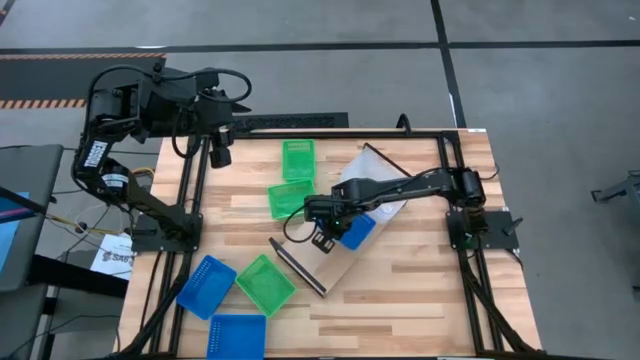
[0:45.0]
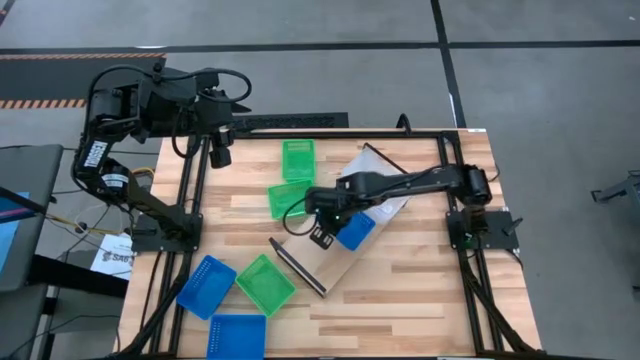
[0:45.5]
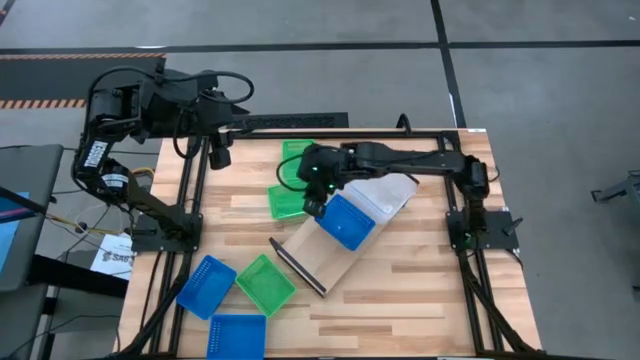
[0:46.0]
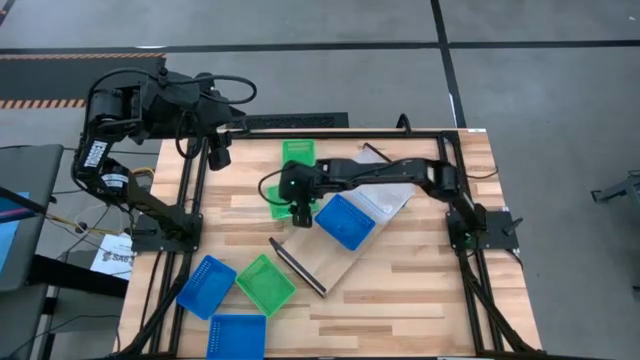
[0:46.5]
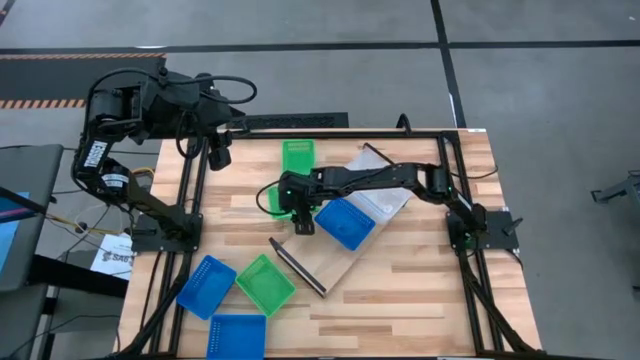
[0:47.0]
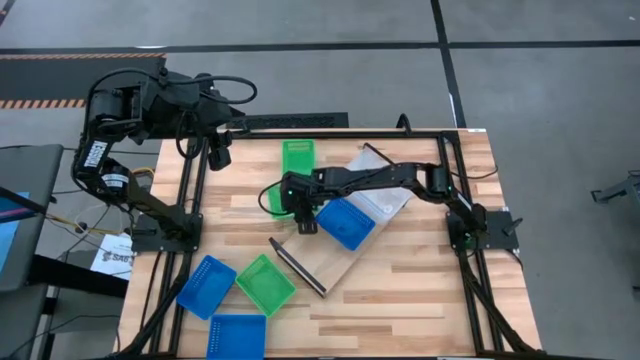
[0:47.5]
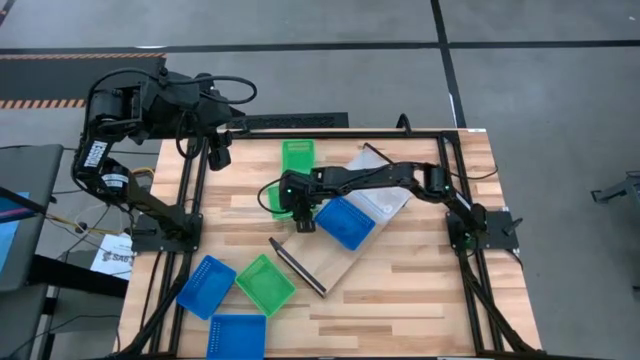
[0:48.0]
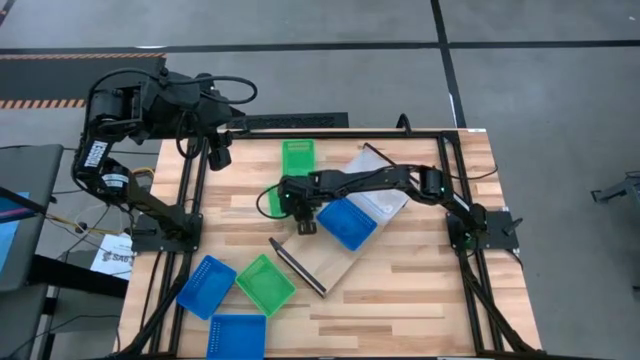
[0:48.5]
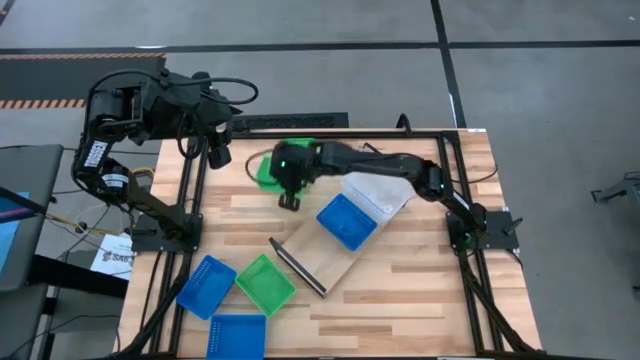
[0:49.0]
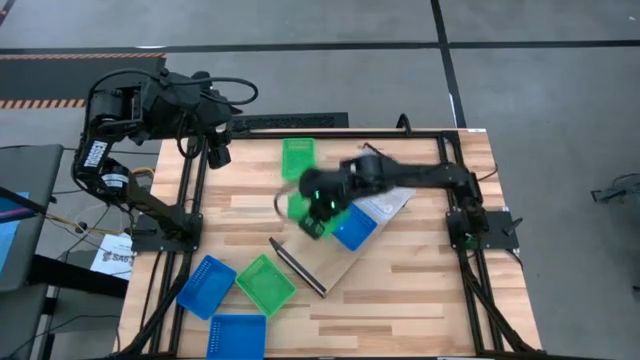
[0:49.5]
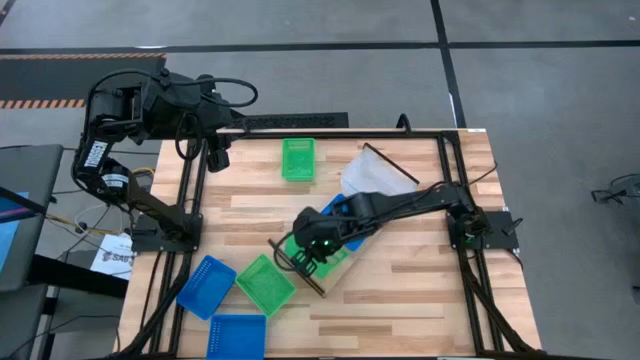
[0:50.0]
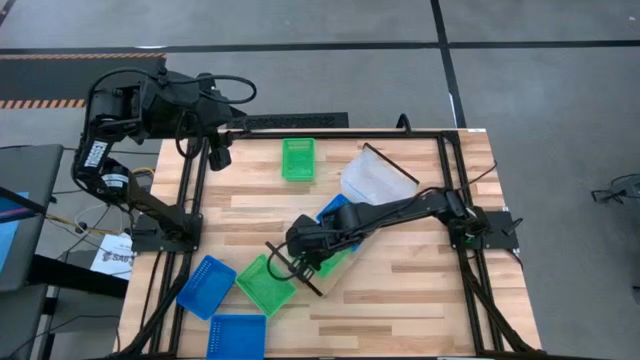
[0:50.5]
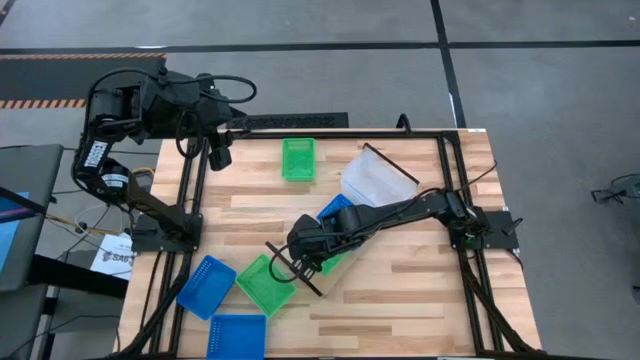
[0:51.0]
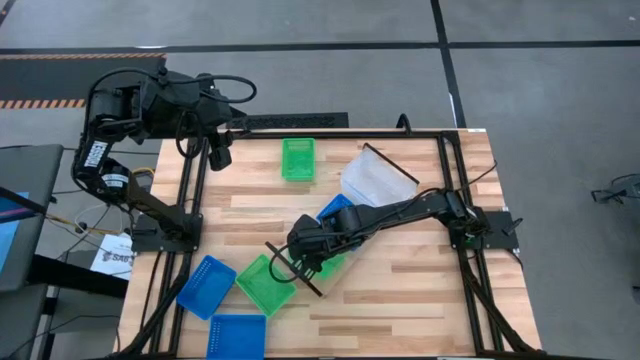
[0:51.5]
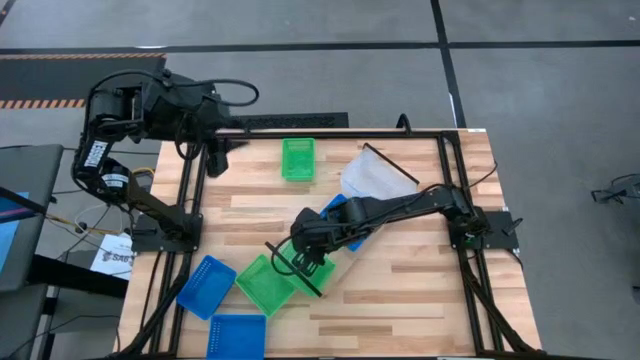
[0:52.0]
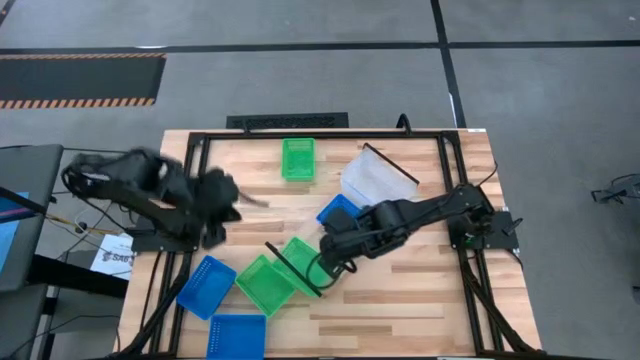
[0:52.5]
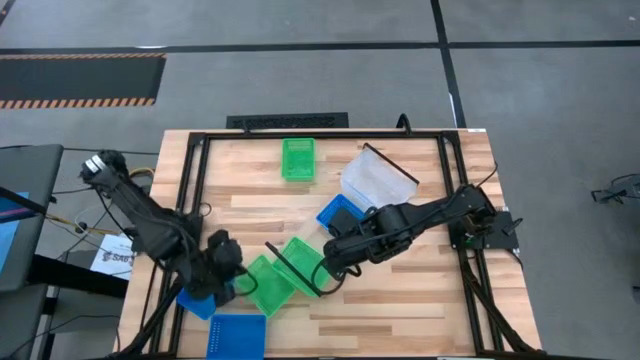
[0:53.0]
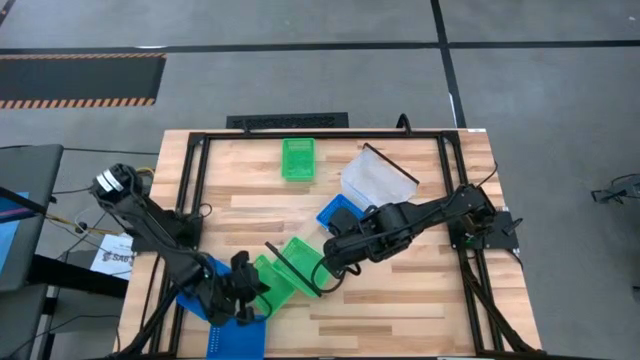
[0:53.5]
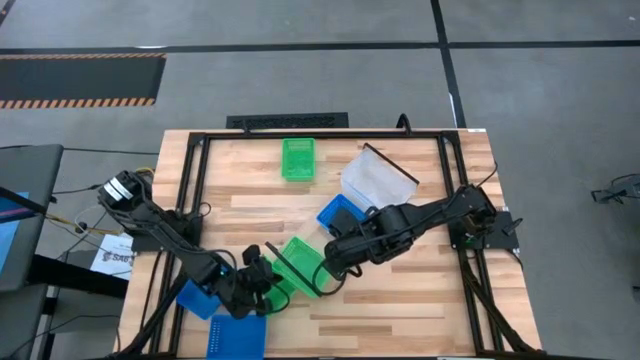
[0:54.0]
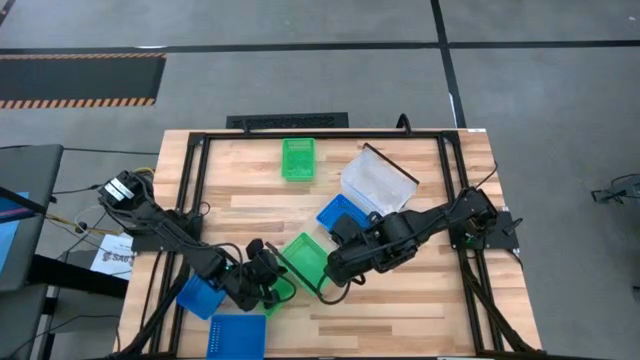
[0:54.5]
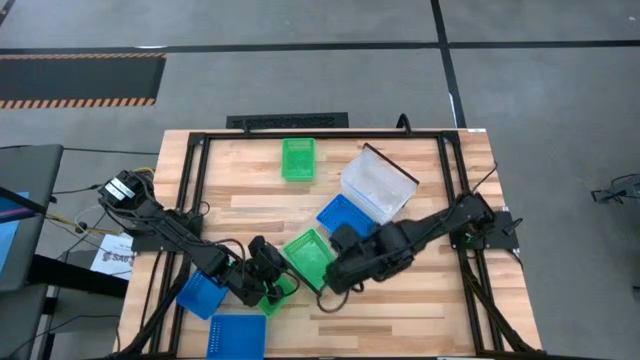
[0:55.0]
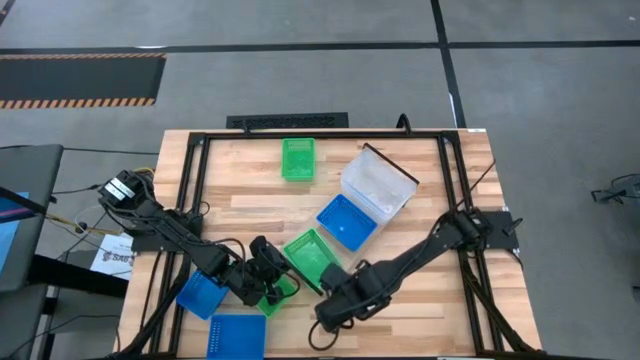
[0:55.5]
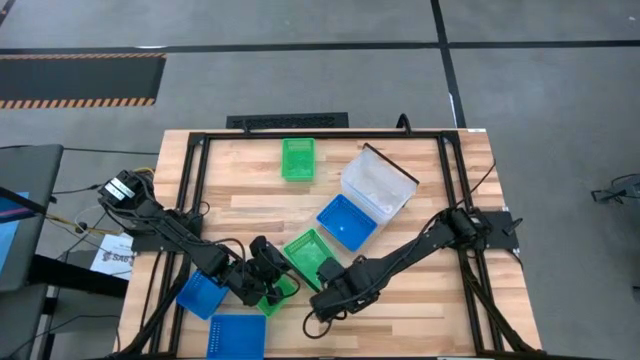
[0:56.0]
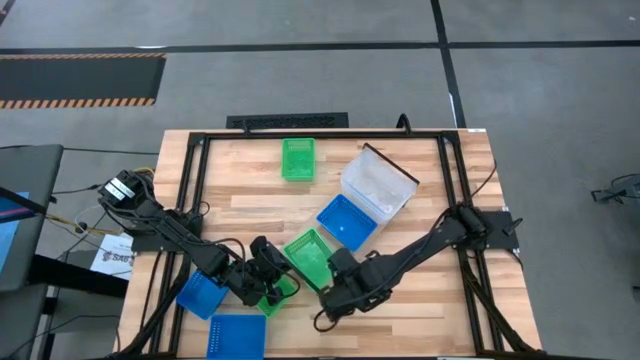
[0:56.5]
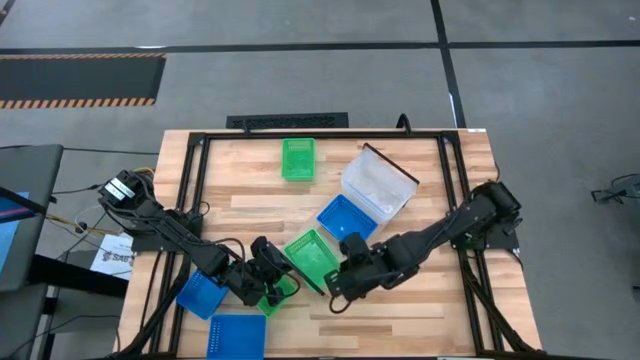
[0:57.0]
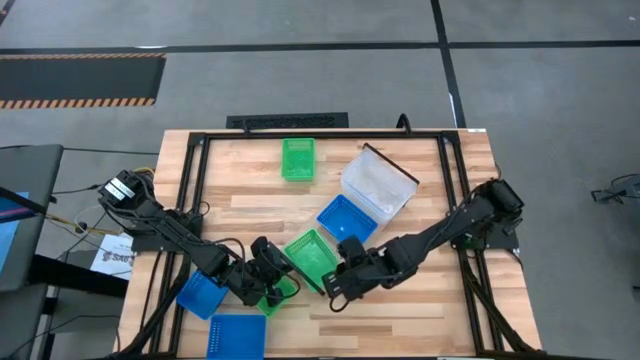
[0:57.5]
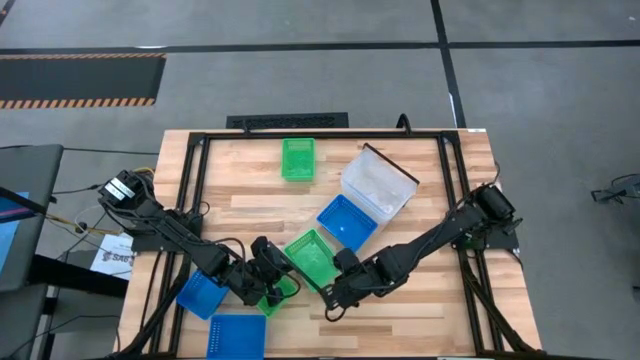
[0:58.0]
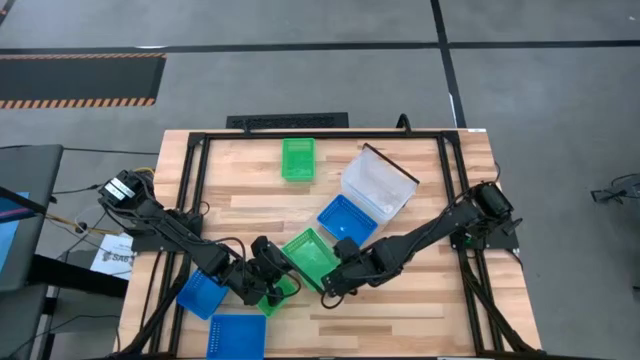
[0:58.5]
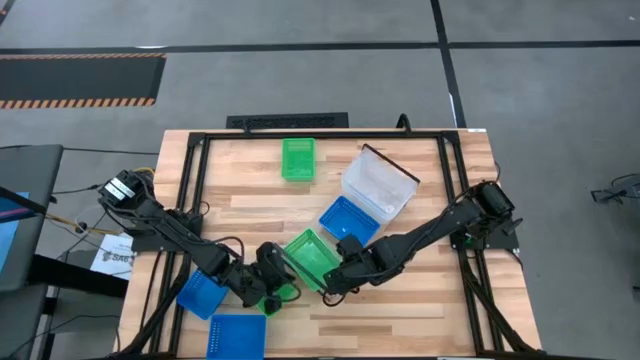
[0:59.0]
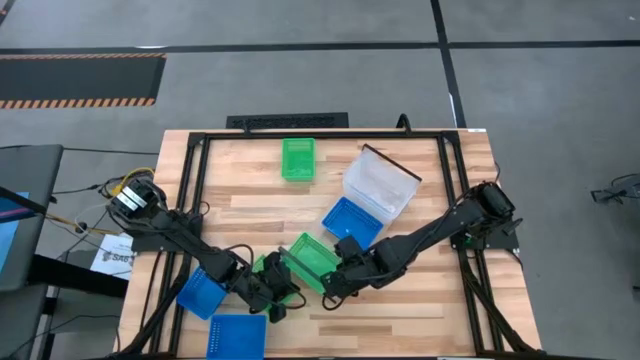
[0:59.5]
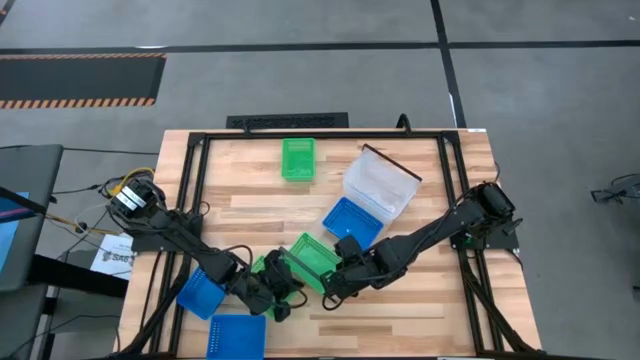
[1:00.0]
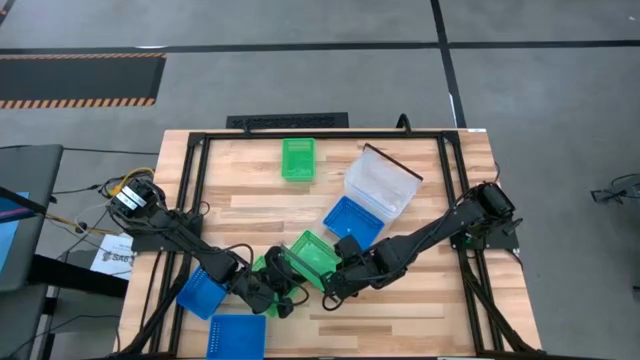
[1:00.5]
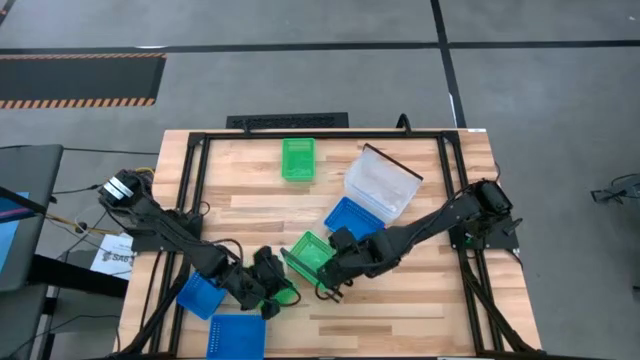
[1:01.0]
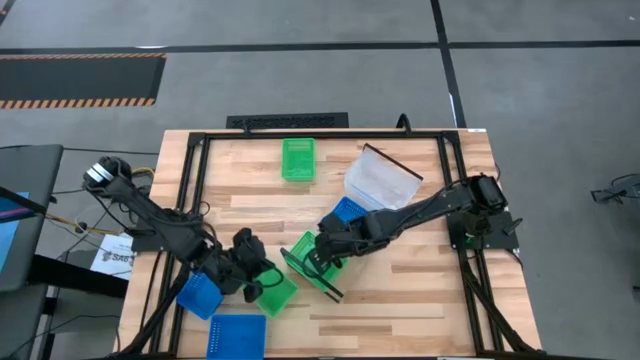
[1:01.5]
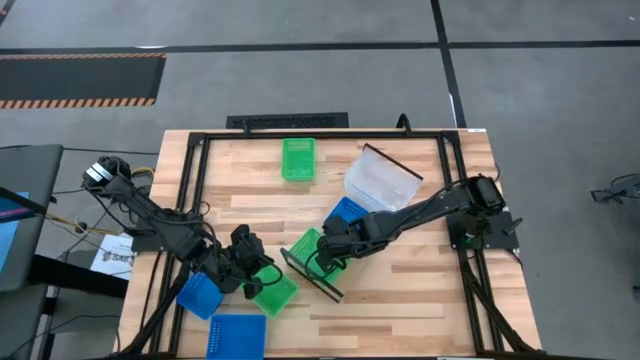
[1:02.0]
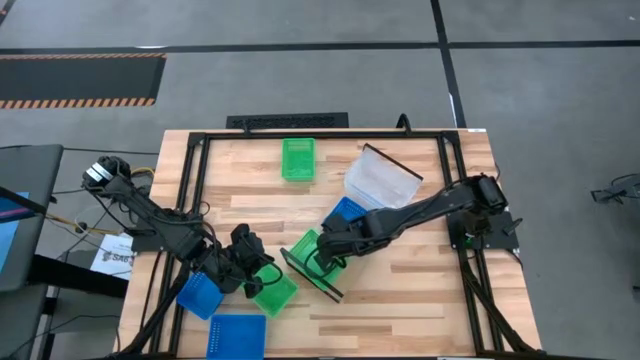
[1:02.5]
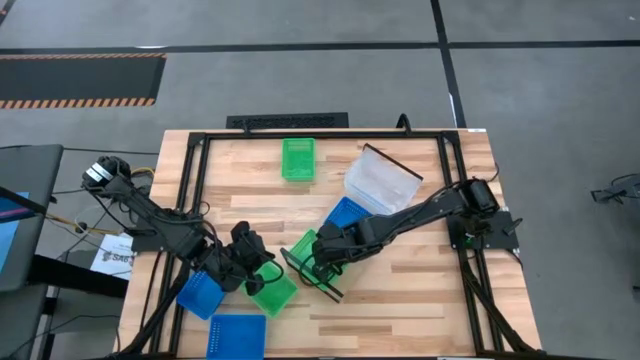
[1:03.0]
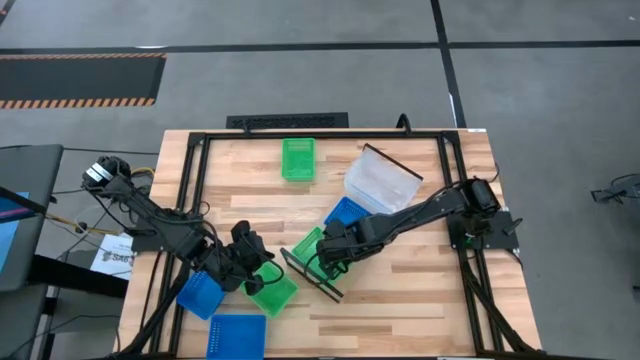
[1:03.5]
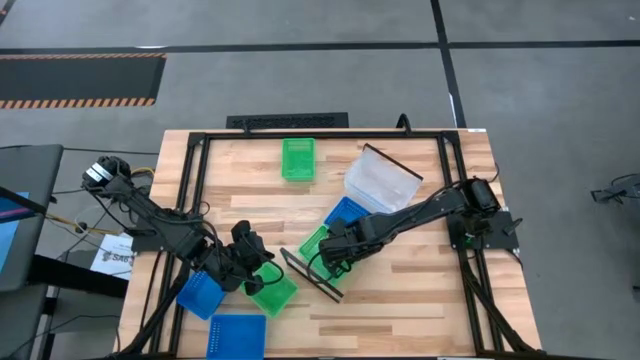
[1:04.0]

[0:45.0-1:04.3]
Task: Stack baskets on shelf by color
Put the middle green bin on the shelf

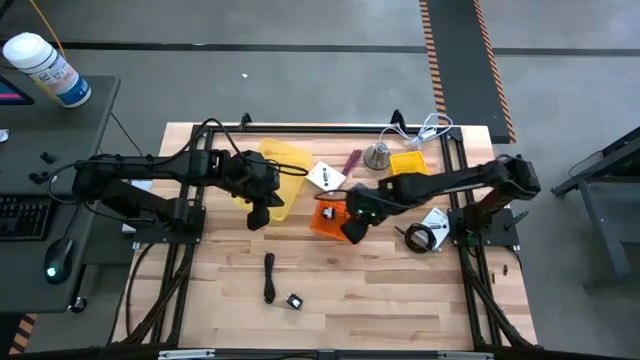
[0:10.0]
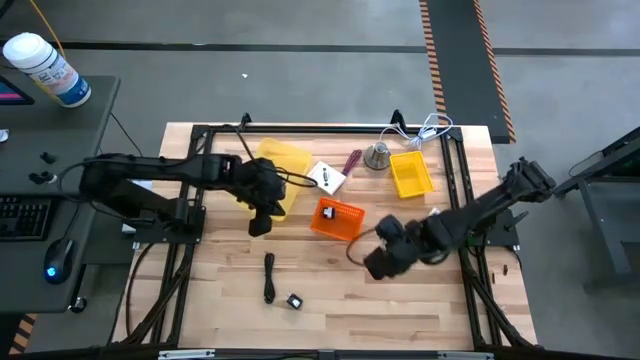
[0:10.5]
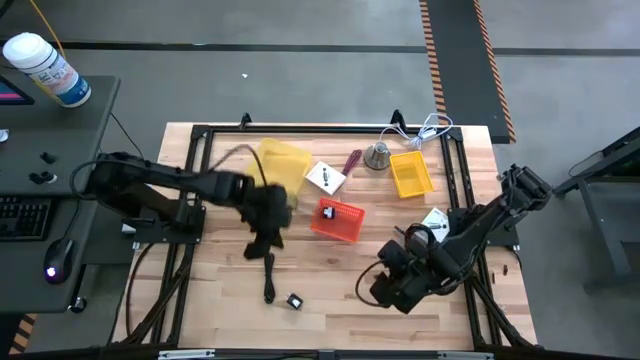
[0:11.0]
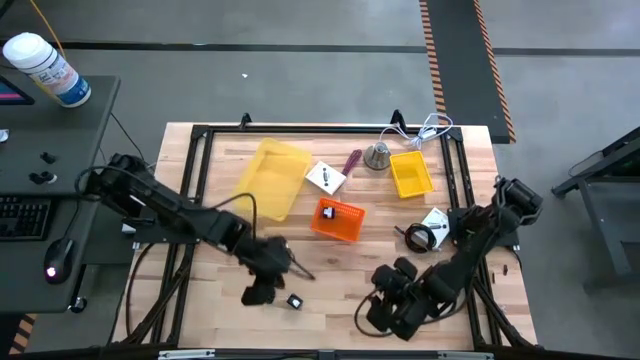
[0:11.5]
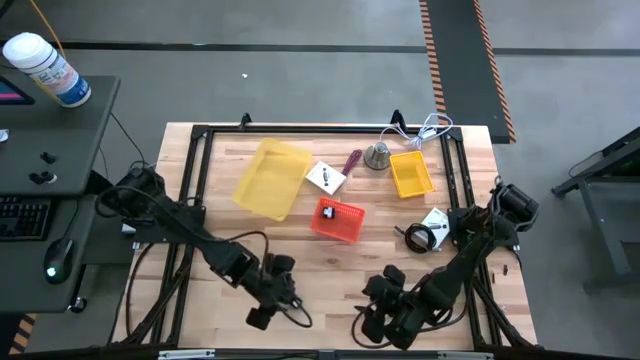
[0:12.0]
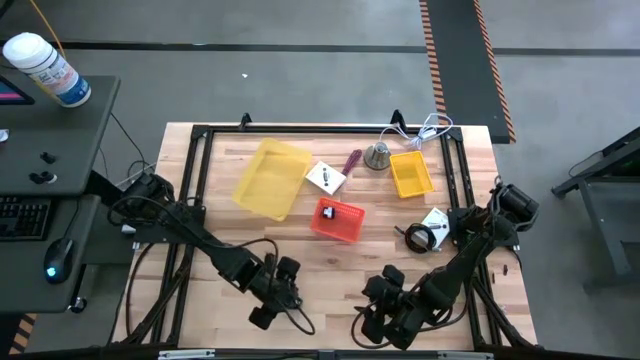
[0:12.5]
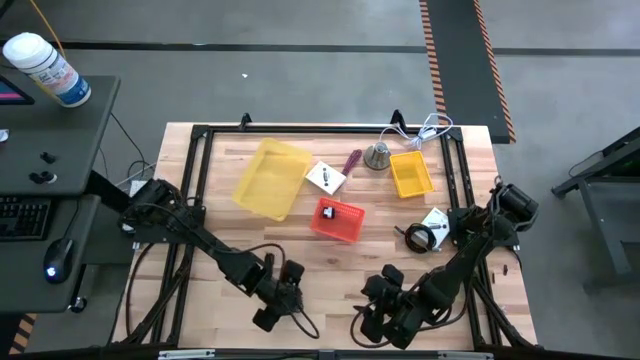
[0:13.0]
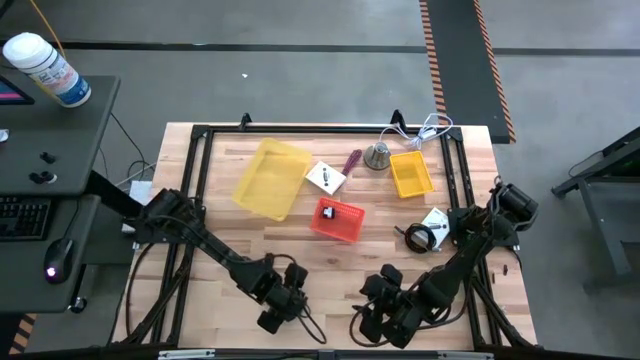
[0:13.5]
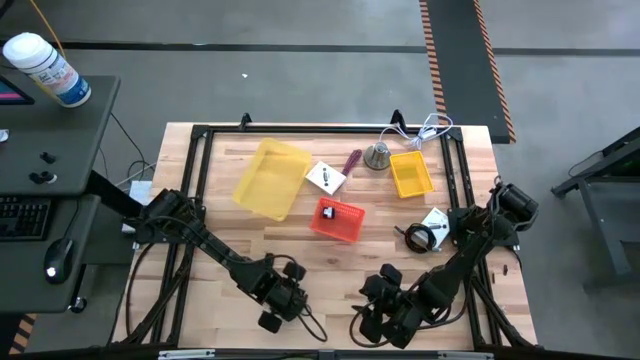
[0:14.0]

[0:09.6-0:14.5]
Task: Pick and place items into bin
Put the black charger adapter into the orange bin
